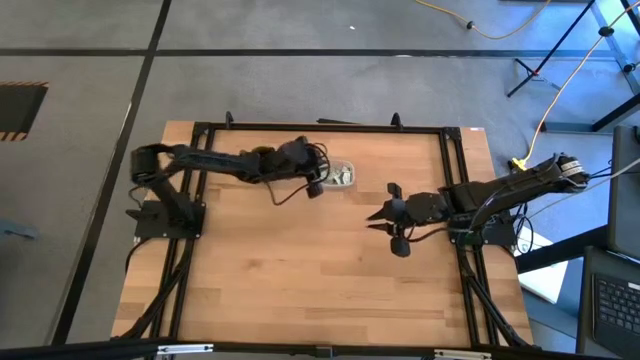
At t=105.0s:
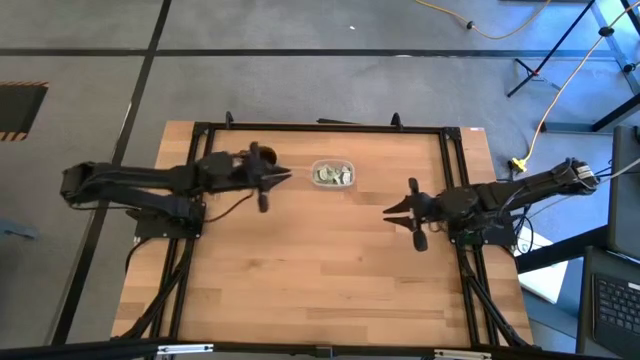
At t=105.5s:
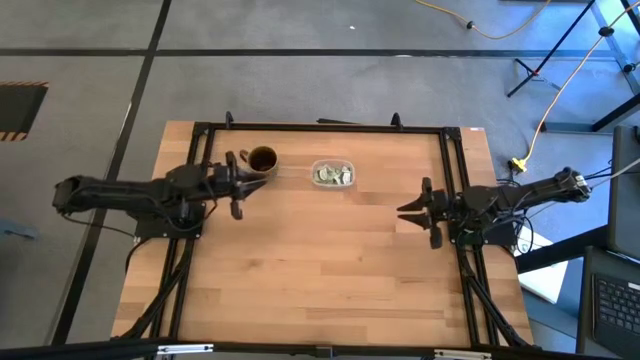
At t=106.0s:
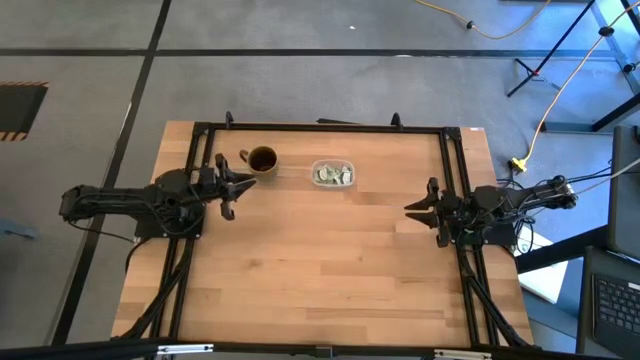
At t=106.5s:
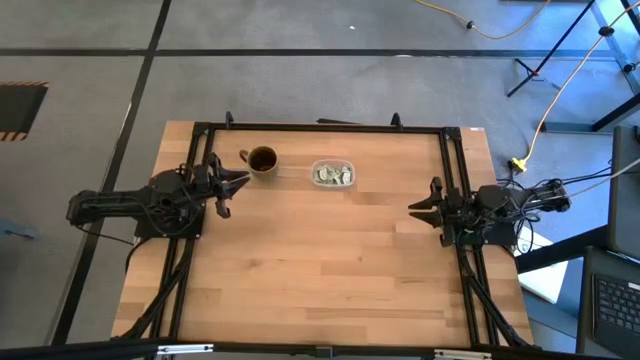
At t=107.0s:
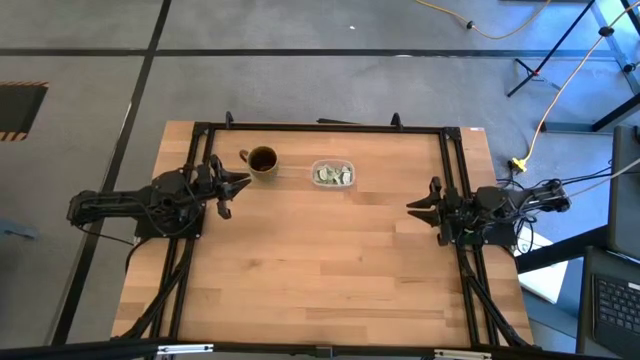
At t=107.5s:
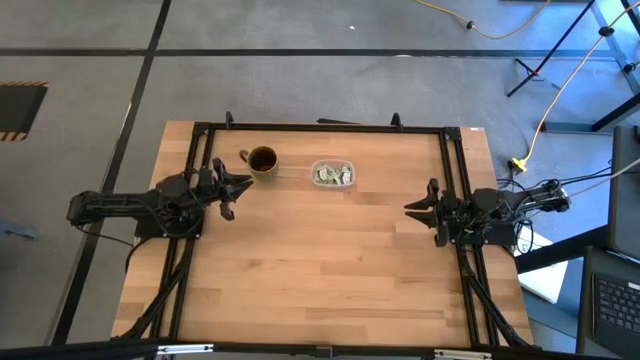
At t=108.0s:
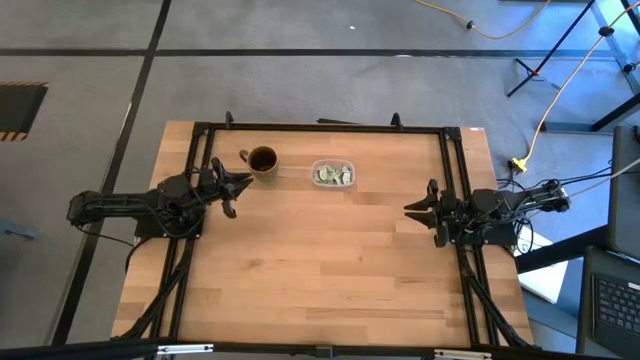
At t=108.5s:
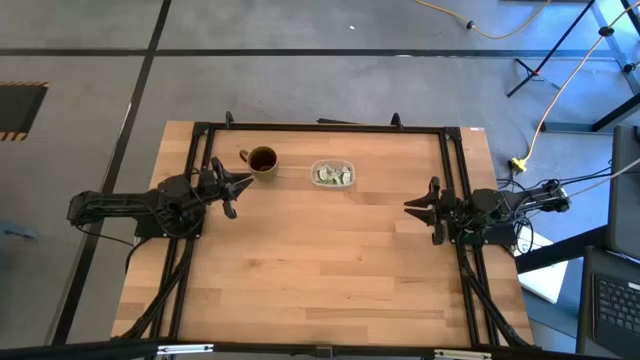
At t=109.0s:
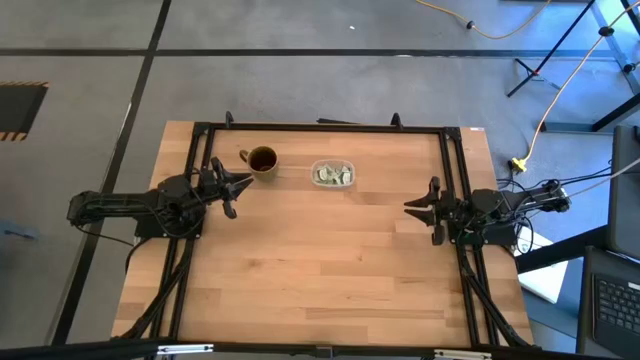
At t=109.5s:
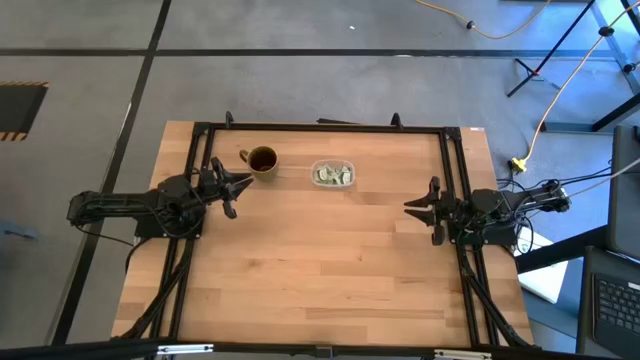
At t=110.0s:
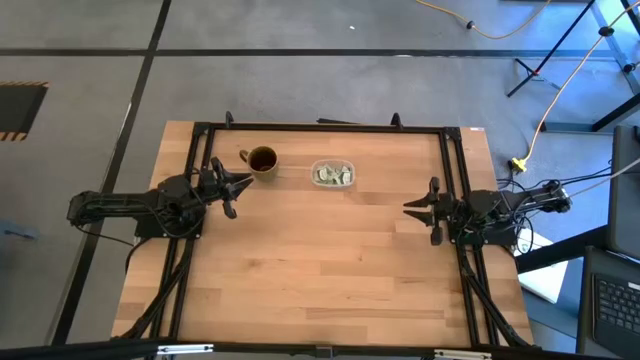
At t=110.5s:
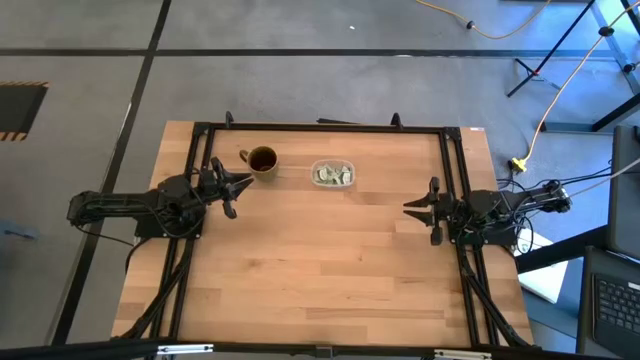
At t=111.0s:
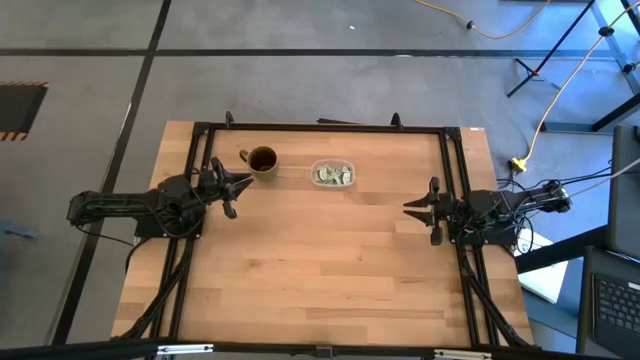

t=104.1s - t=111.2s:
Task: Pick and place Stevia / Truvia into bins
Return to Home Position

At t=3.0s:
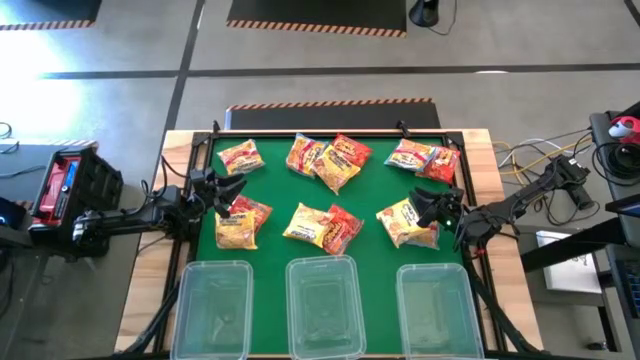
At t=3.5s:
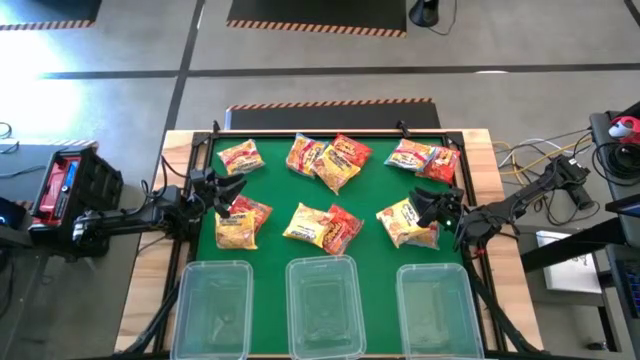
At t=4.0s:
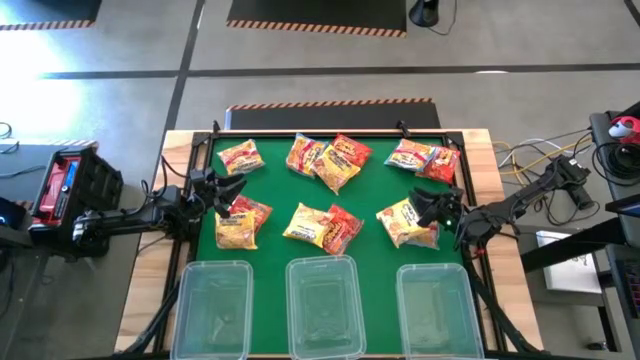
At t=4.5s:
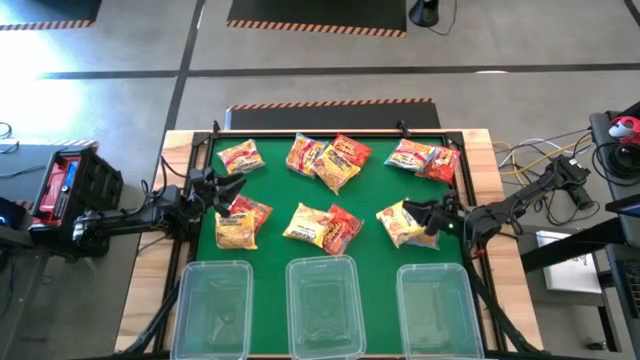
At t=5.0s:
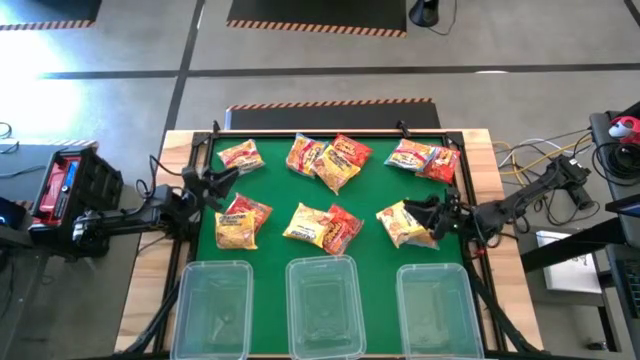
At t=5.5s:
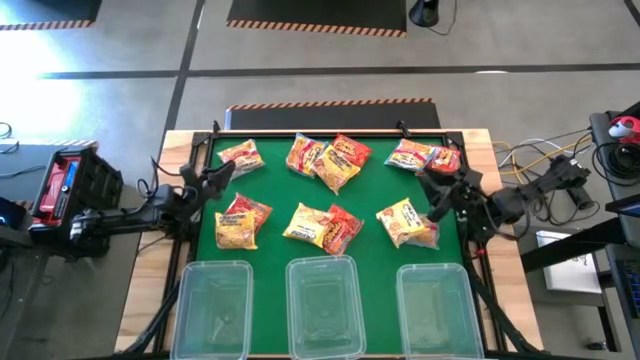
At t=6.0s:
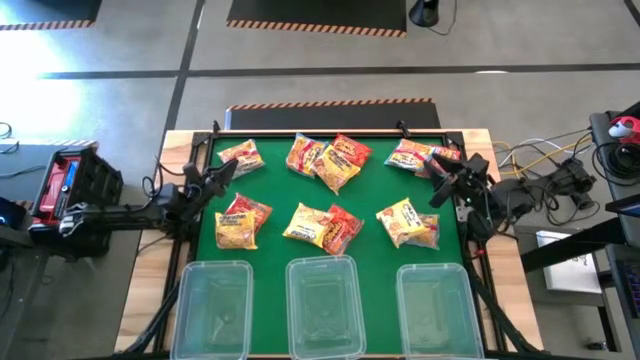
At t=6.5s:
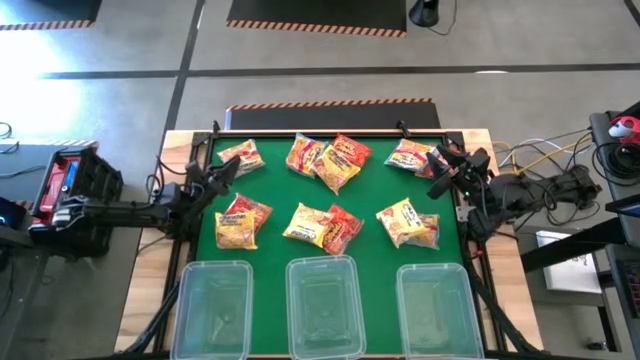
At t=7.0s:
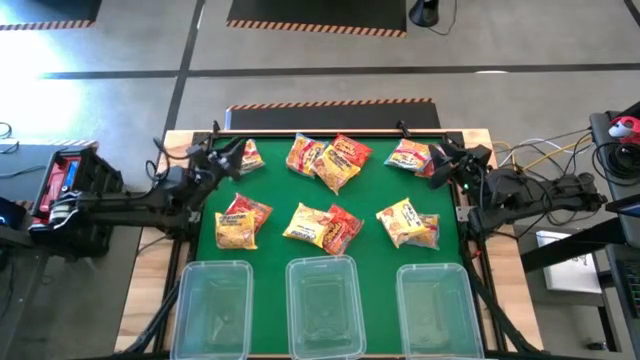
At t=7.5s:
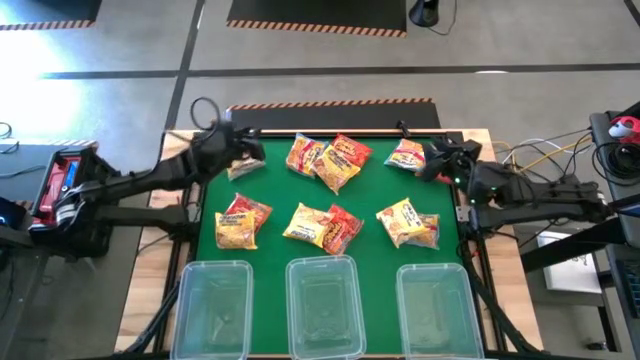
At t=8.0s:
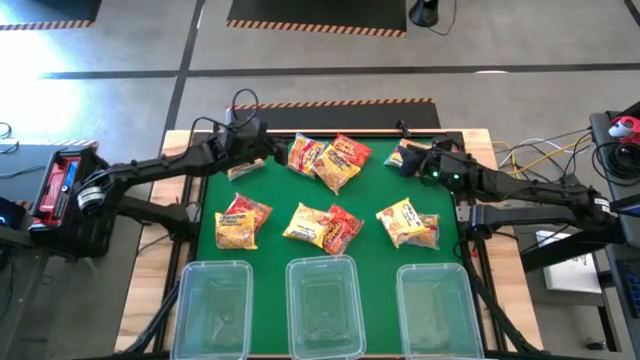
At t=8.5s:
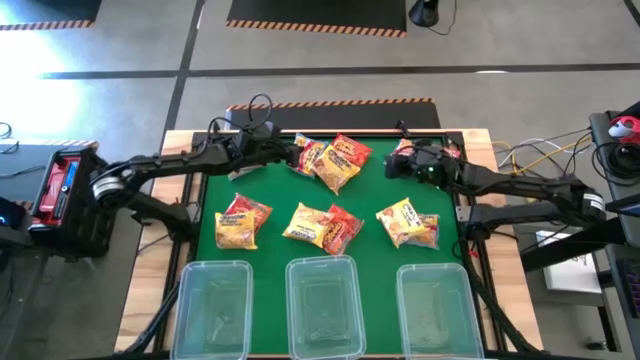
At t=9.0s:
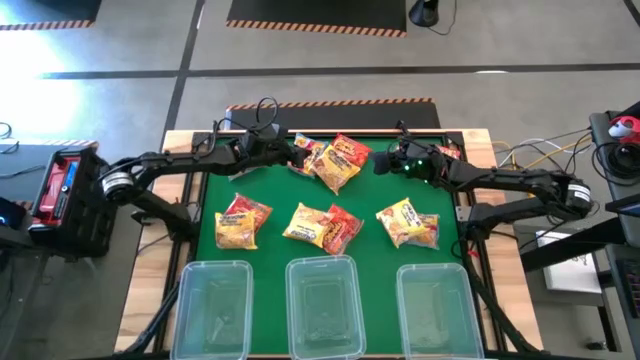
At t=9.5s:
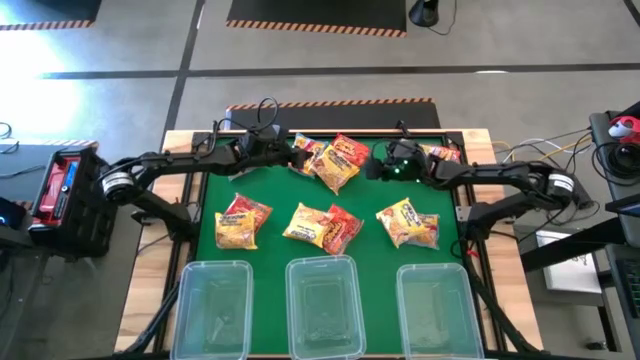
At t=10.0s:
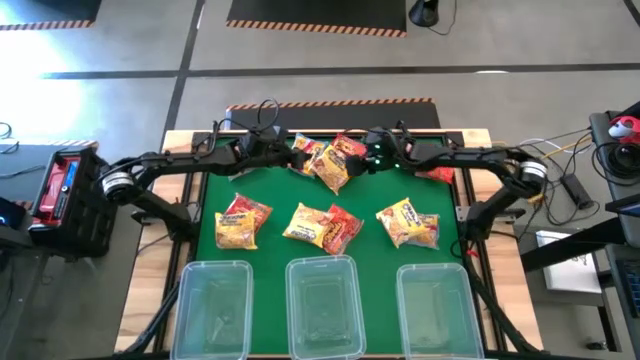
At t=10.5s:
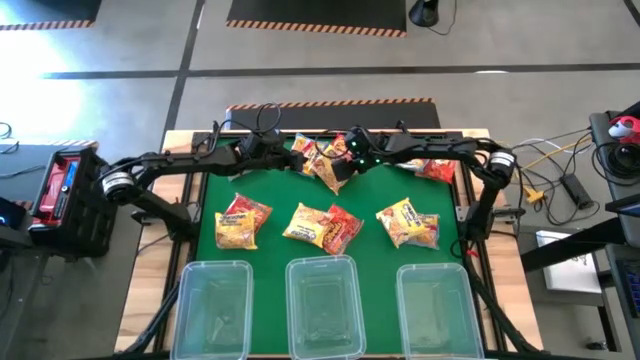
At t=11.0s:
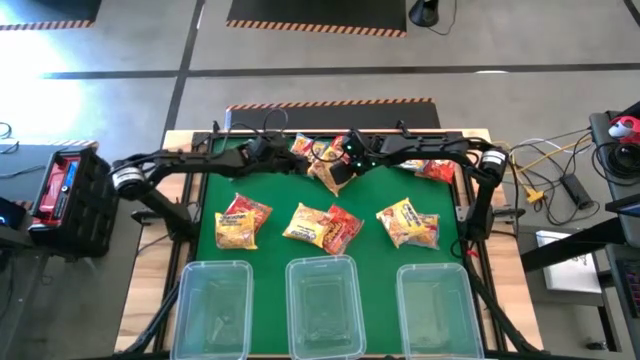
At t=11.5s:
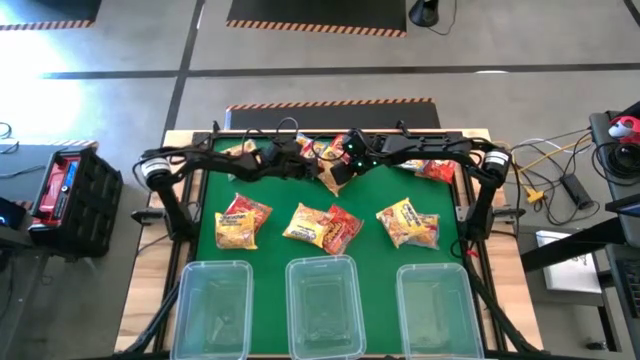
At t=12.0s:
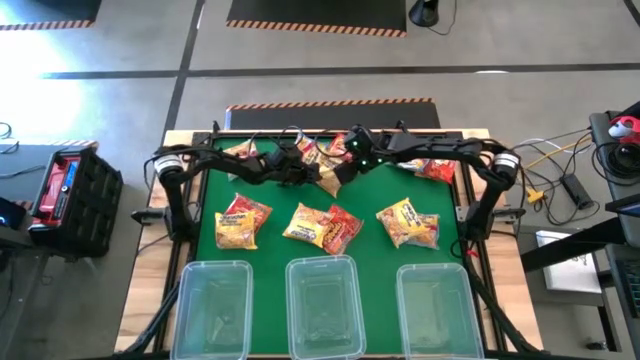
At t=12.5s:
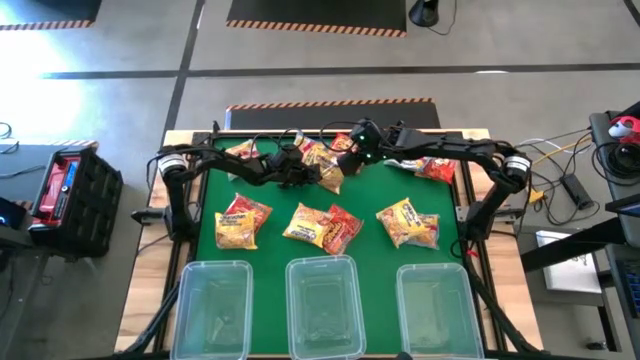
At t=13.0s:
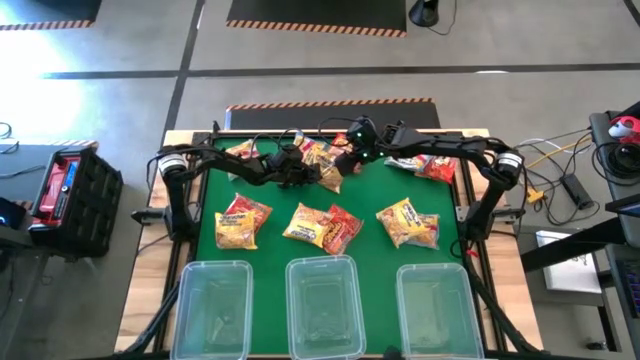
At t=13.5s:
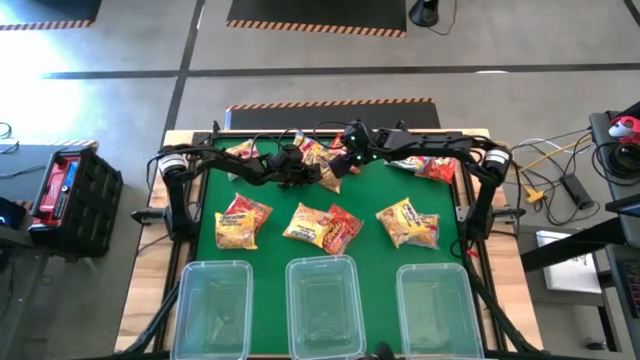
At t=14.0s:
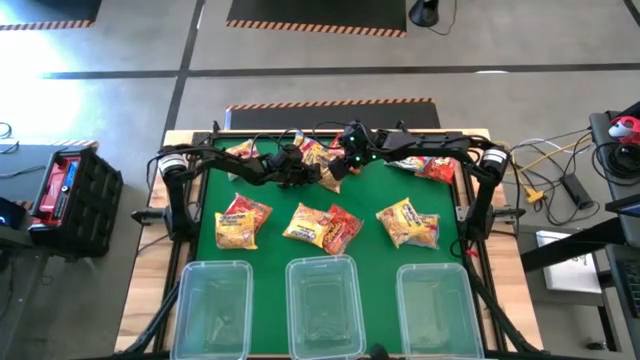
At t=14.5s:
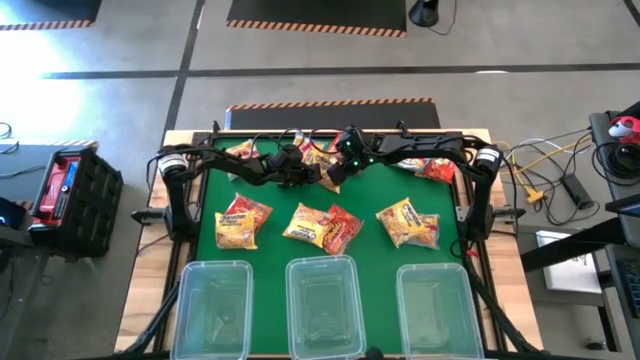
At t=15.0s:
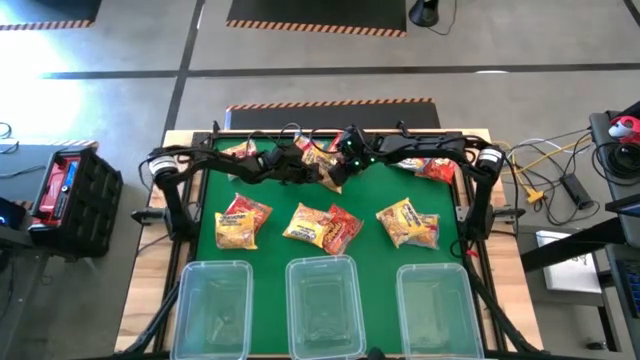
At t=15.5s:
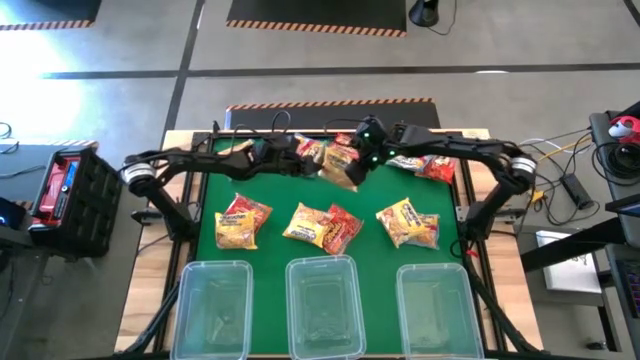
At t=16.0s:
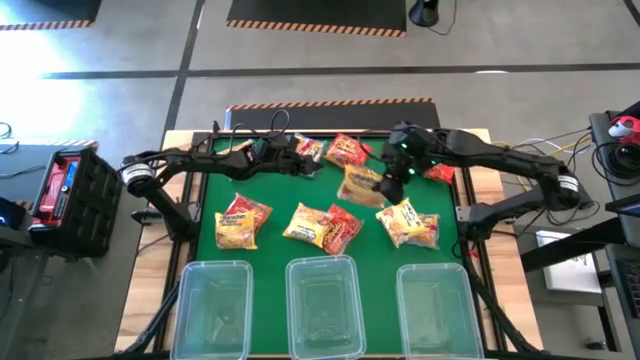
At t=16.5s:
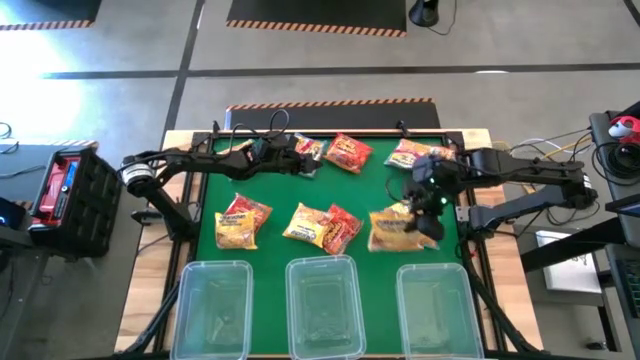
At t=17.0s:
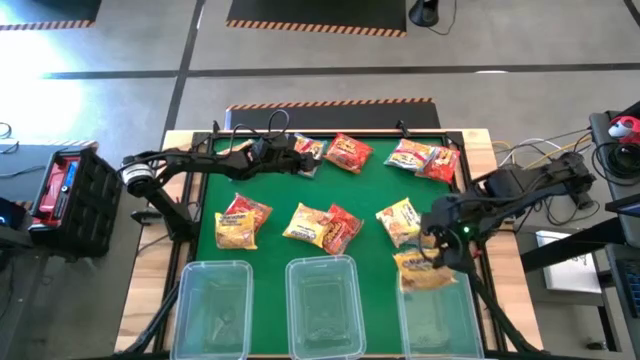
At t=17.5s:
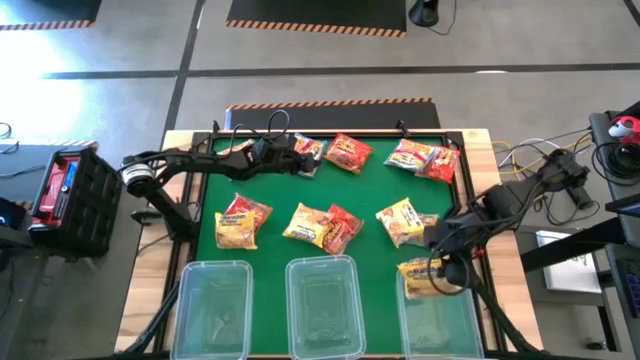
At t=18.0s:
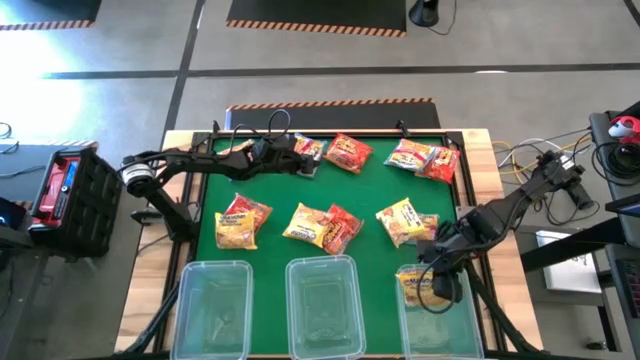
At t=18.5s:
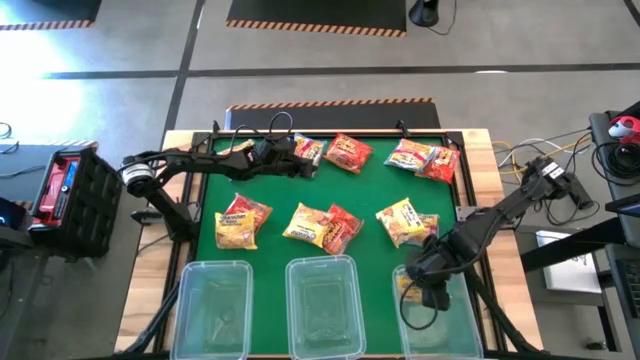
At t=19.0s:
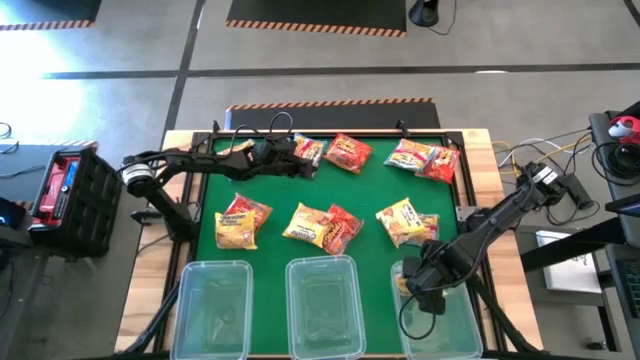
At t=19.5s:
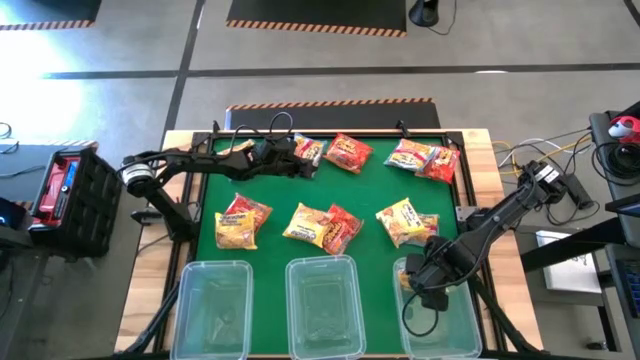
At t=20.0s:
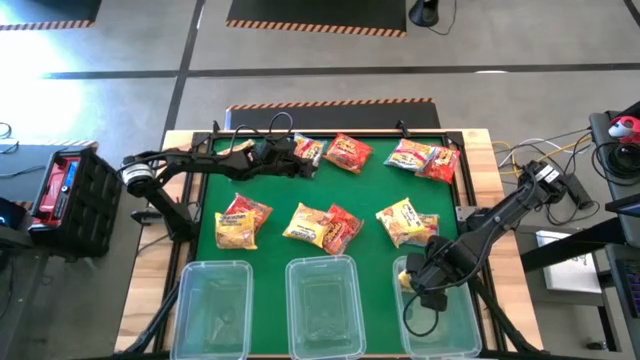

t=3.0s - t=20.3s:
Task: Sort Maruchan noodles
Put the yellow noodle pack into the right transparent bin
